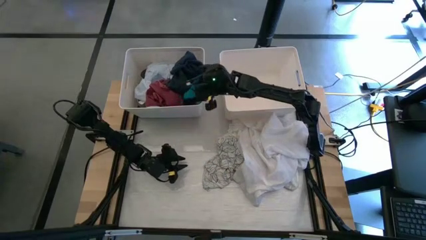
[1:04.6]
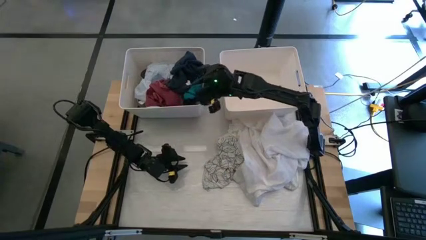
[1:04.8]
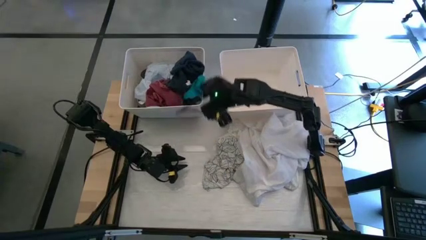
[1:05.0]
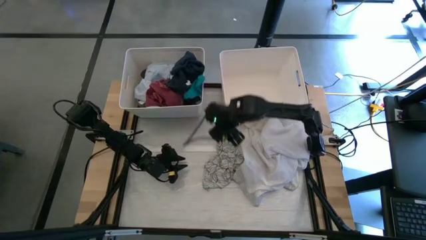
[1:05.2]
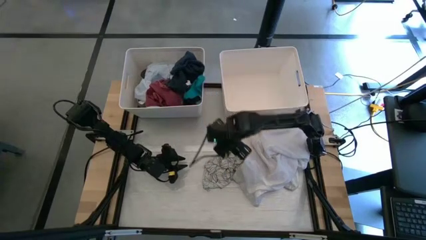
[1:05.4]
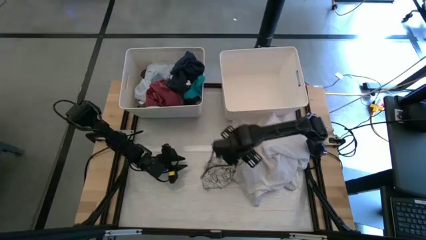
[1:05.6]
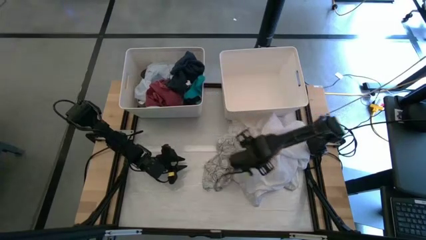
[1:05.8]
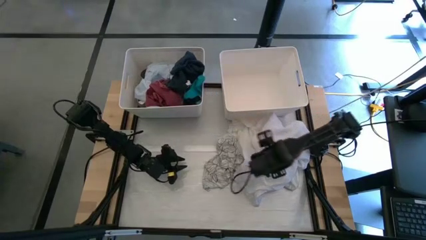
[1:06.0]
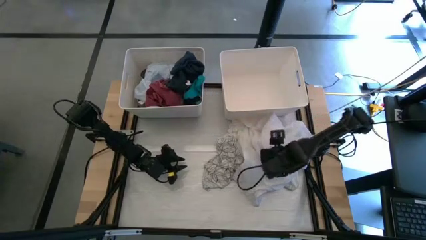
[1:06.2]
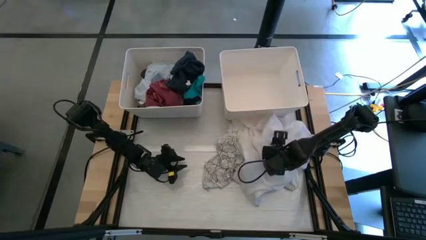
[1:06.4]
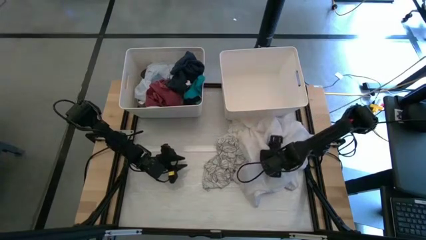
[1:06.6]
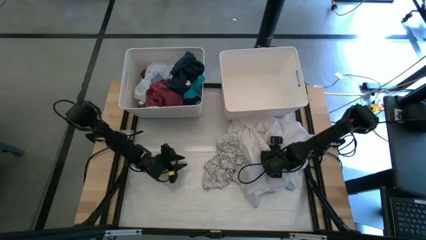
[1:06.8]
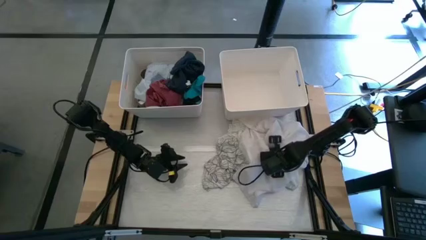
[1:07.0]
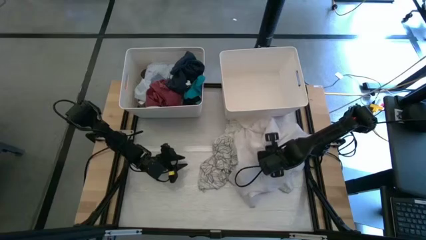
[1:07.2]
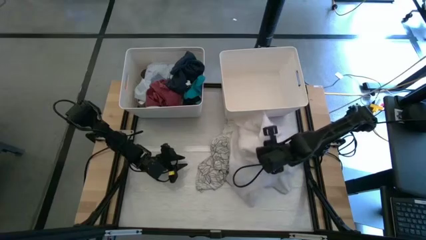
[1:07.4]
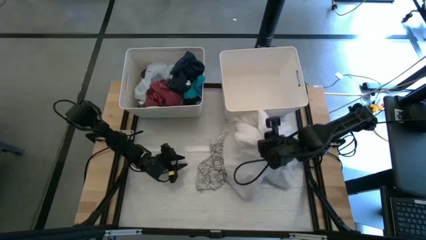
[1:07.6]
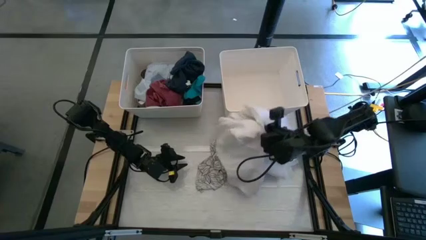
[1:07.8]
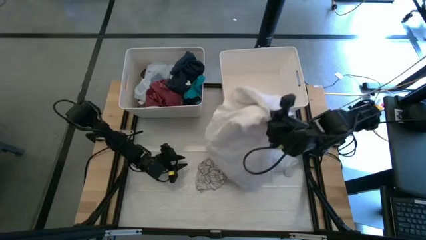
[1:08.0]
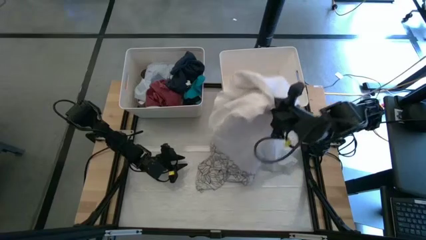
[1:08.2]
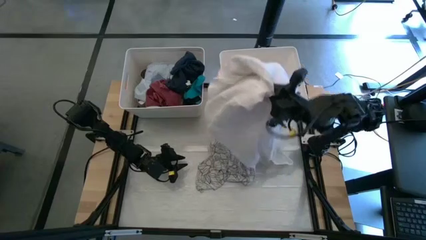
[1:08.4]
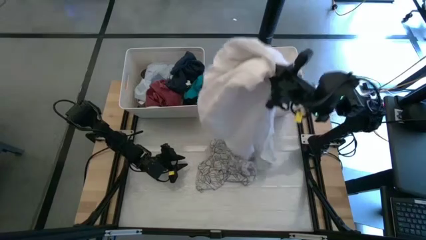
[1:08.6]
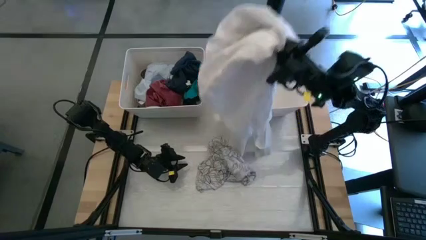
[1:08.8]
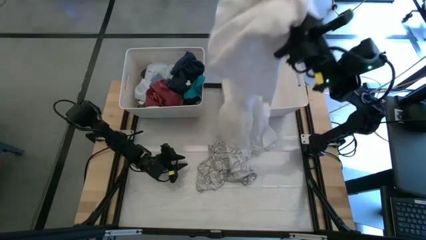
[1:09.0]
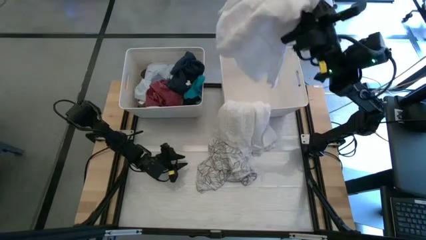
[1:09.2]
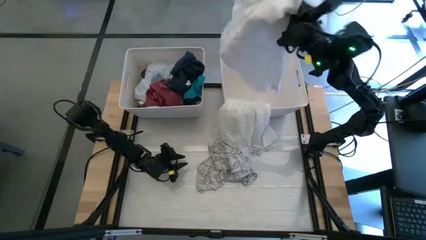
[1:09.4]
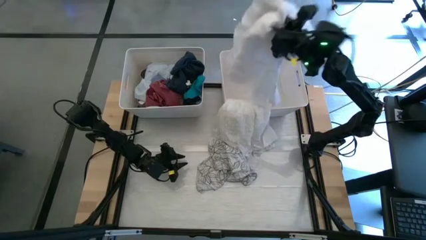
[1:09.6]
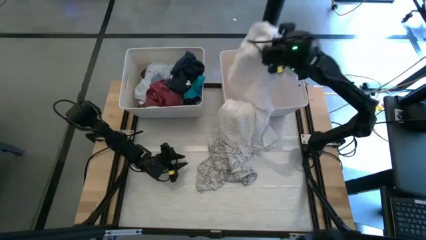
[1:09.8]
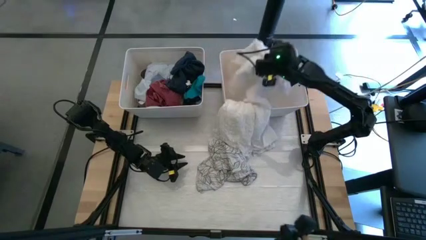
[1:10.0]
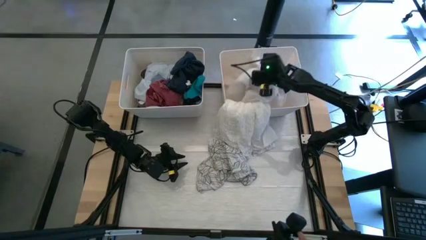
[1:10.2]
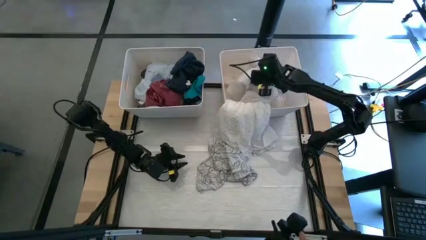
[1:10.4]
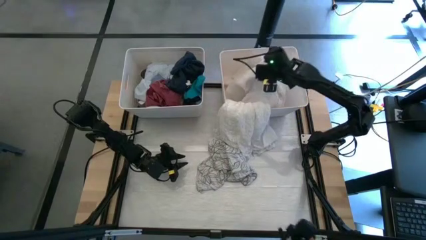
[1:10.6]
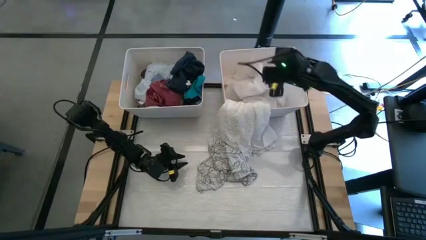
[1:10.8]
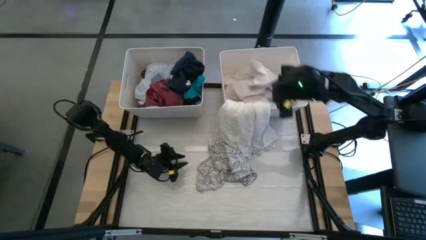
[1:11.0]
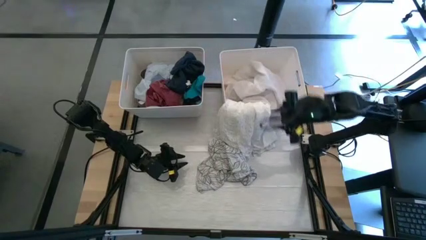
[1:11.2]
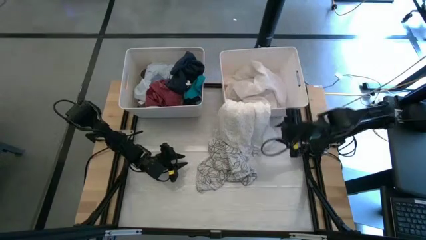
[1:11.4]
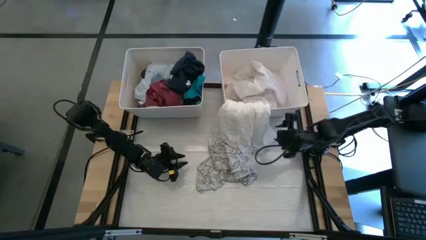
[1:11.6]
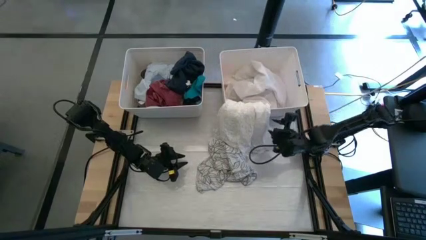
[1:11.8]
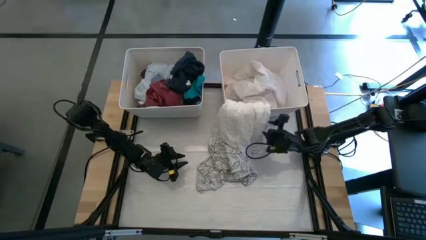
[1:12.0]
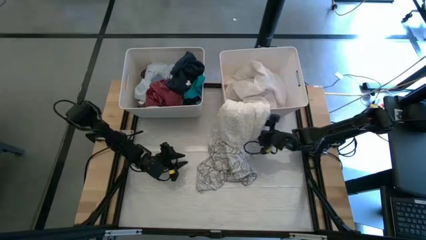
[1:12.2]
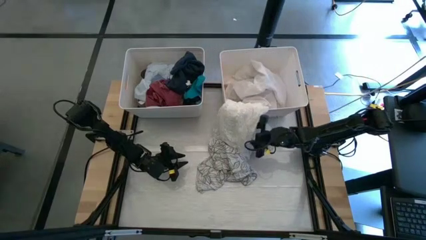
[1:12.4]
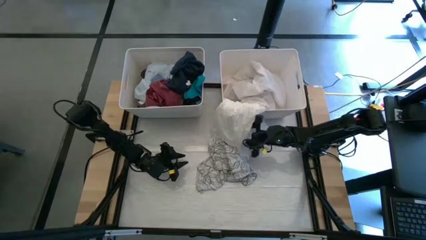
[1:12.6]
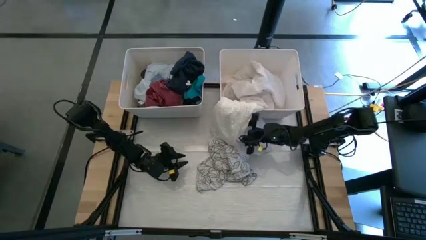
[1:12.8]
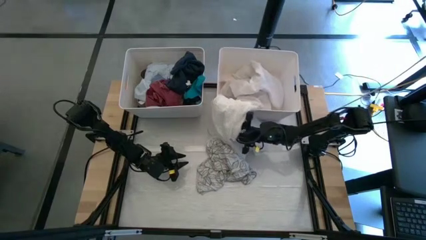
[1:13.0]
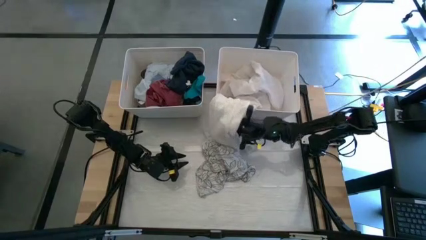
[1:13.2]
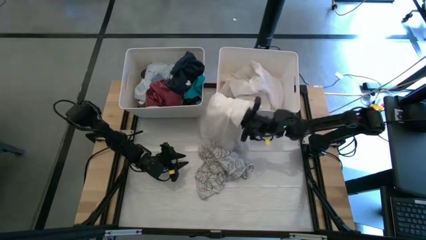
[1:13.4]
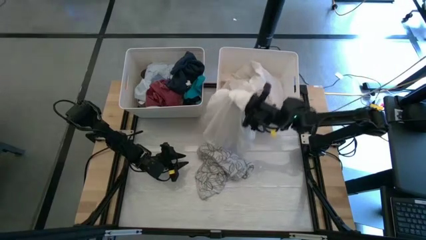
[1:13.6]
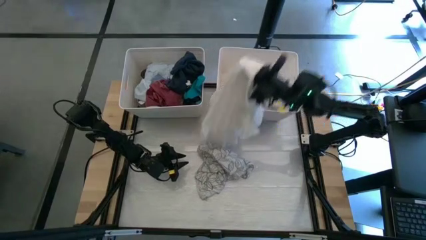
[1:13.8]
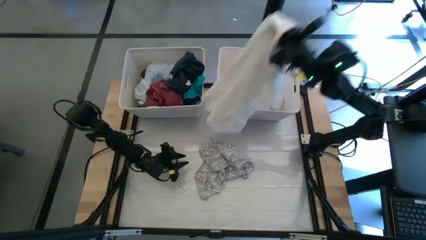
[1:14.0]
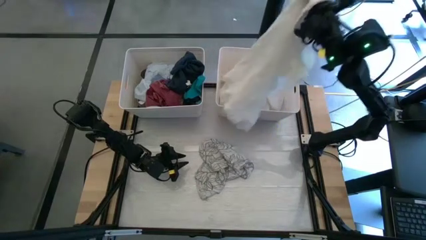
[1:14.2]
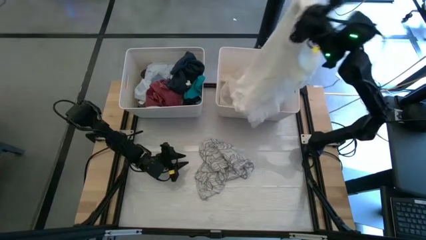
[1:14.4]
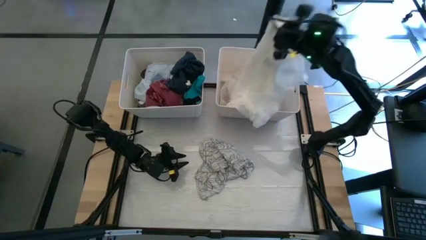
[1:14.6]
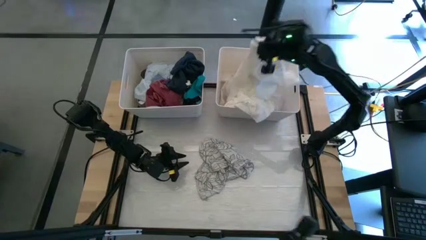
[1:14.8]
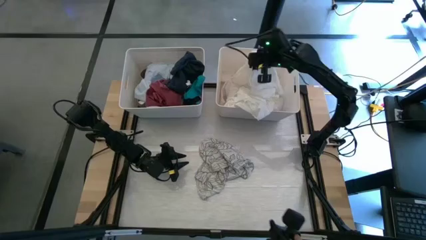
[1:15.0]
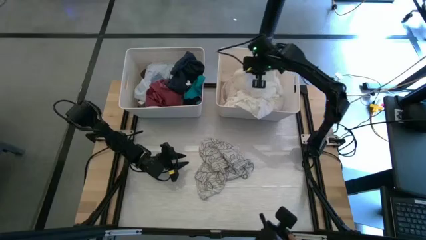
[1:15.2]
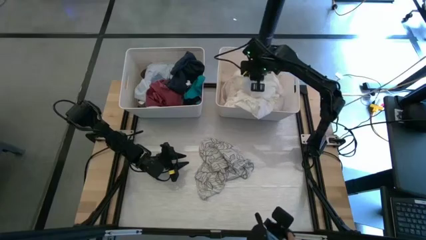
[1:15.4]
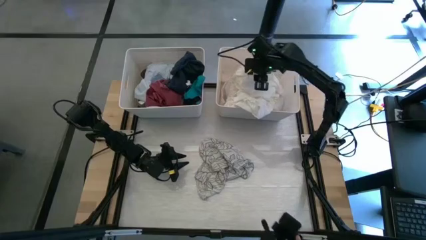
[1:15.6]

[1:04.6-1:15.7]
Task: Sort clothes
Put the white dress into the right white laundry bin

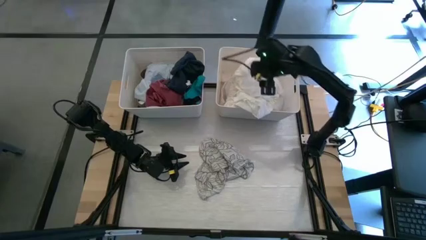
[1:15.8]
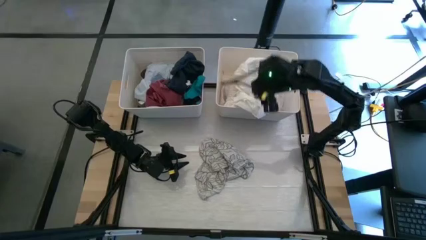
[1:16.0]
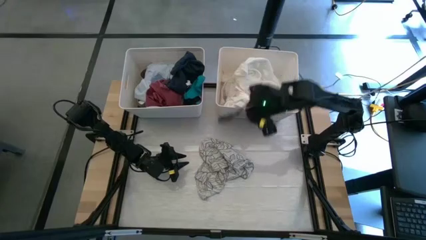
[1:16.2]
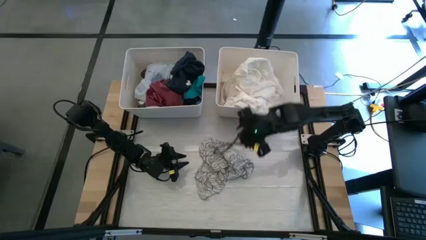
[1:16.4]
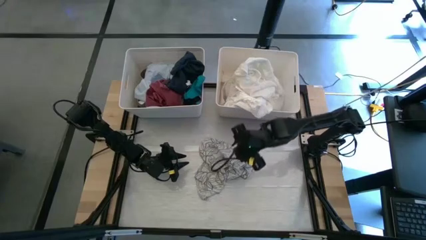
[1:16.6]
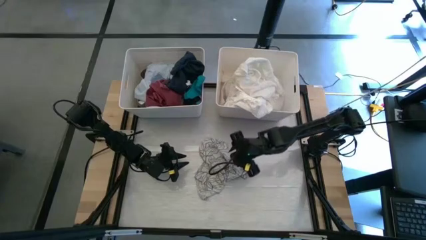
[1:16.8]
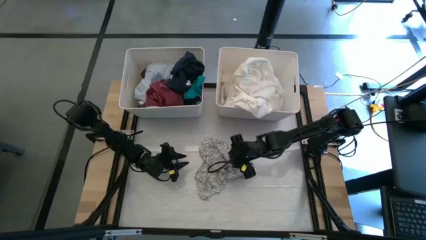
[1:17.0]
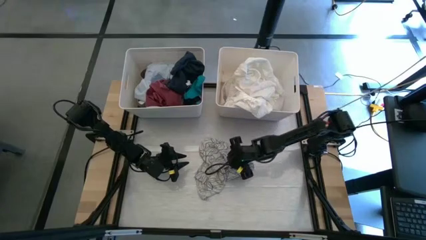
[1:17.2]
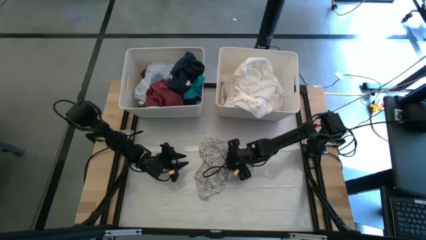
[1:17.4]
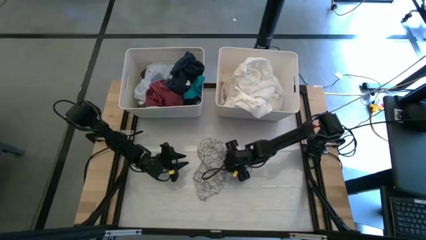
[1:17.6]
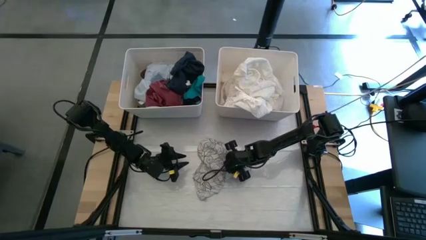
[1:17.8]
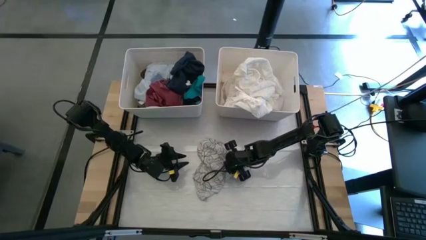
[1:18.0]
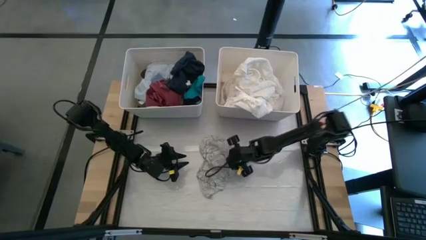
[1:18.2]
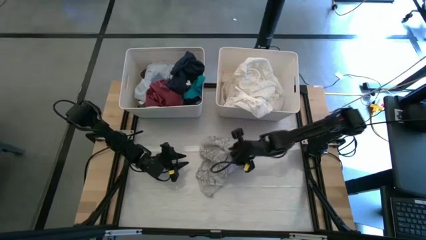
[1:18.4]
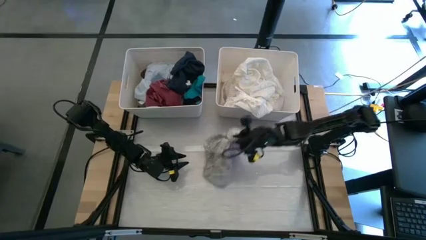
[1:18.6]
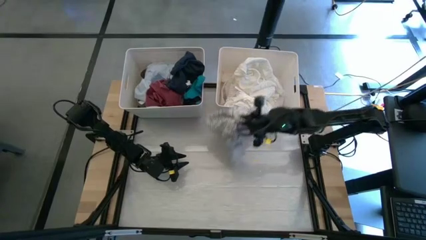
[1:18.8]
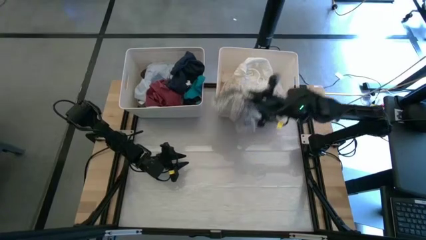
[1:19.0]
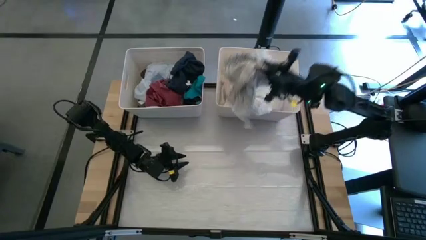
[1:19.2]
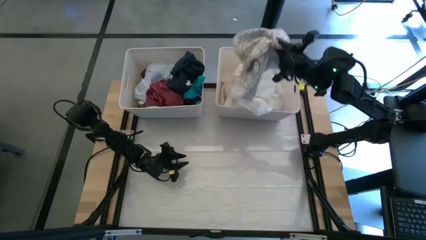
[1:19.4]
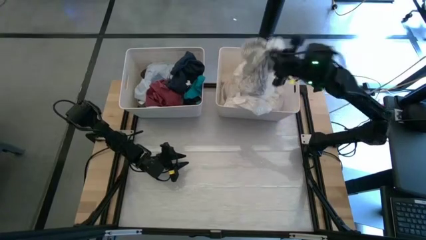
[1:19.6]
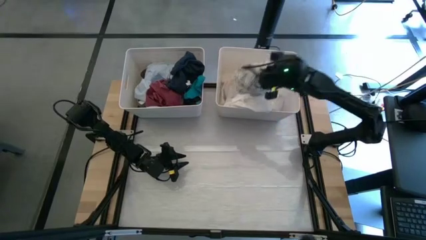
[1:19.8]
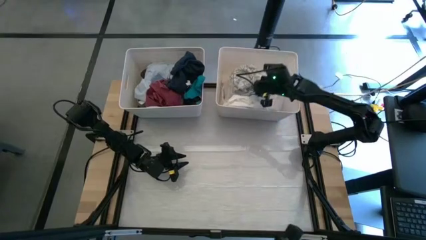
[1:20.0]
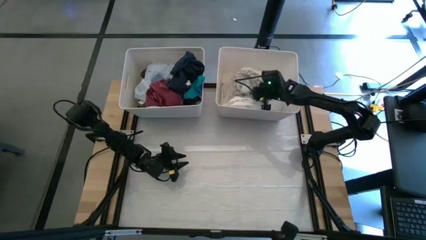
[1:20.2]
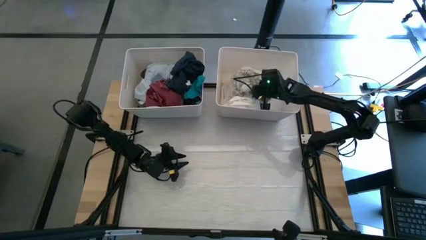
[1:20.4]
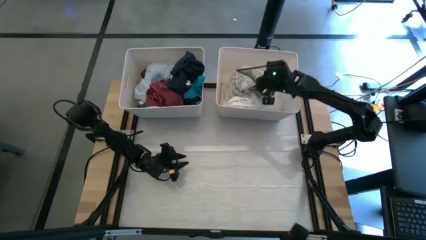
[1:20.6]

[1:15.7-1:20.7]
Put the white patterned shirt into the right white laundry bin
